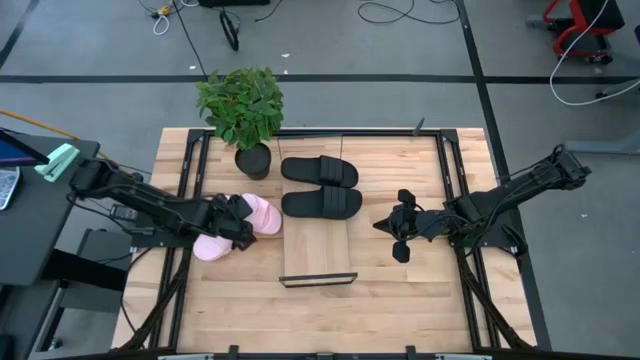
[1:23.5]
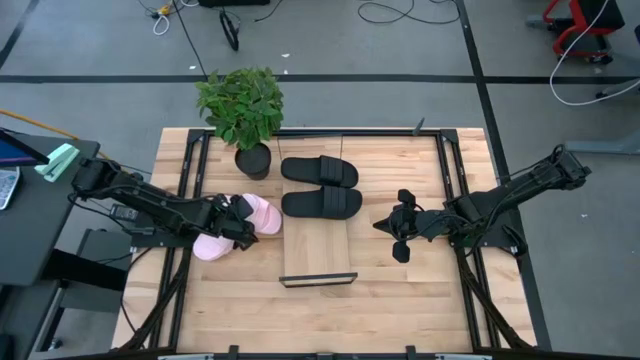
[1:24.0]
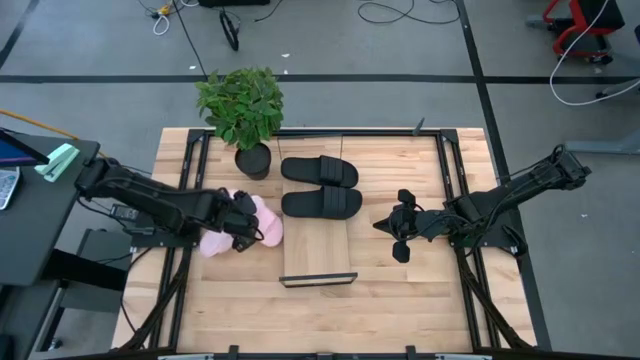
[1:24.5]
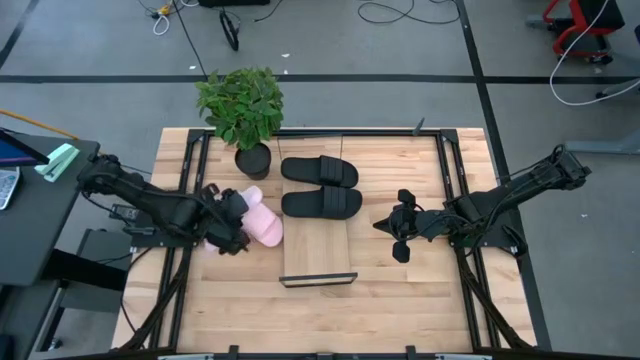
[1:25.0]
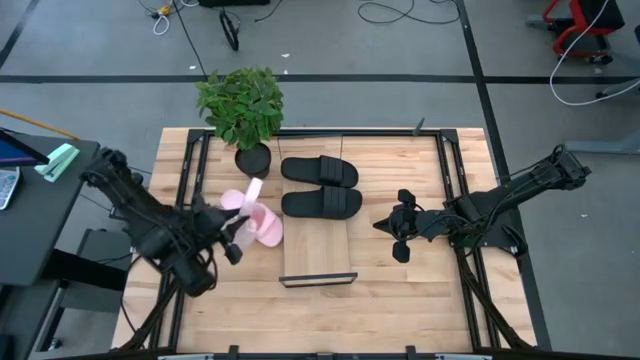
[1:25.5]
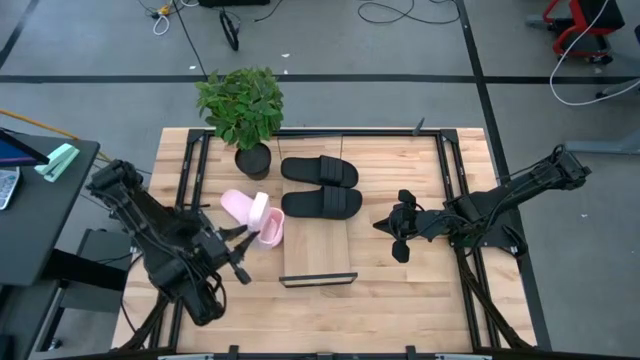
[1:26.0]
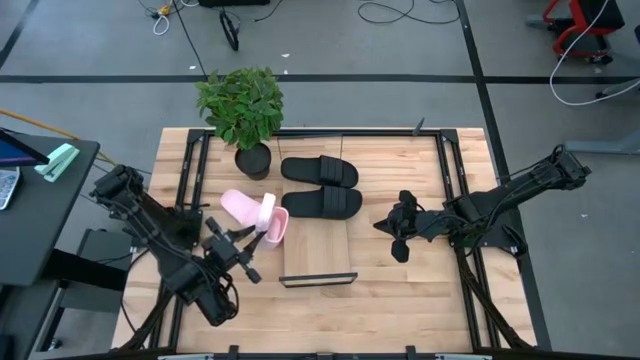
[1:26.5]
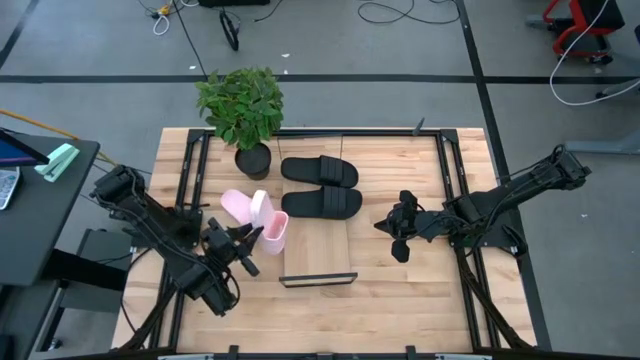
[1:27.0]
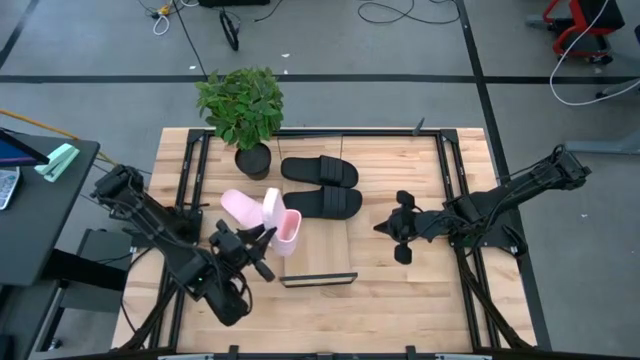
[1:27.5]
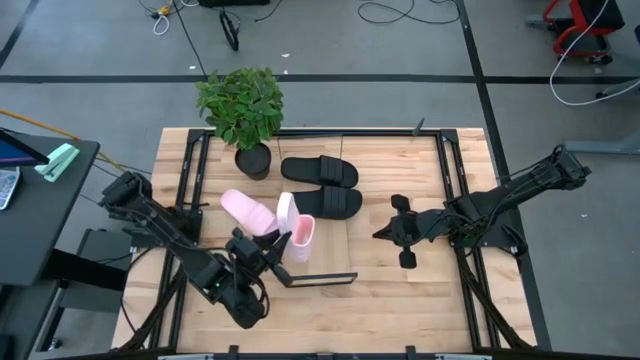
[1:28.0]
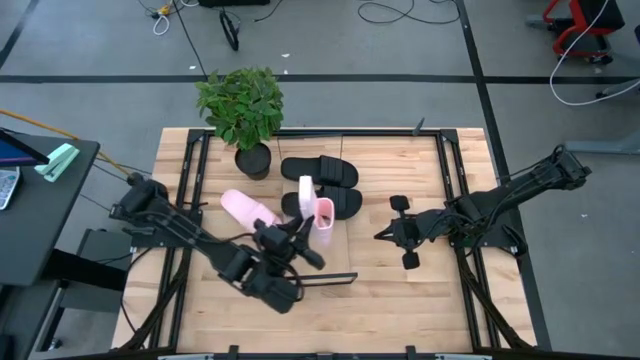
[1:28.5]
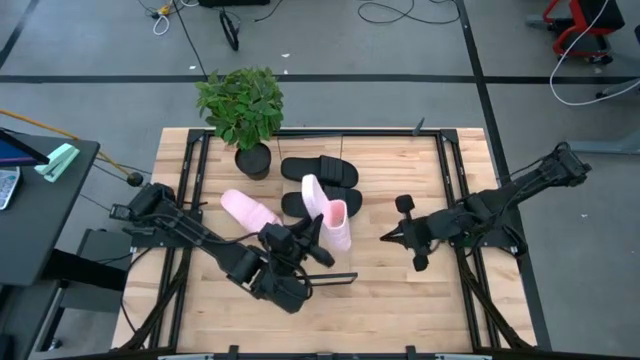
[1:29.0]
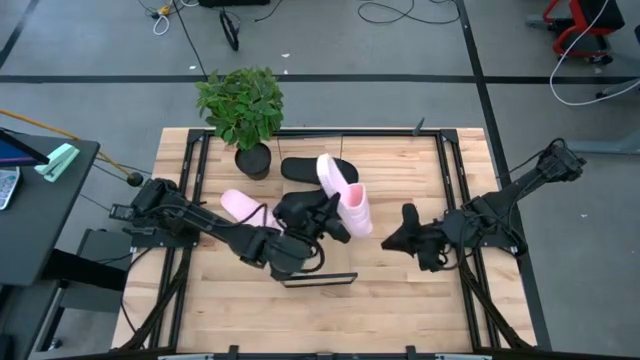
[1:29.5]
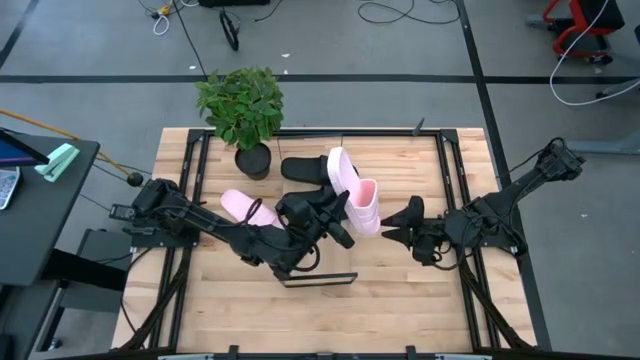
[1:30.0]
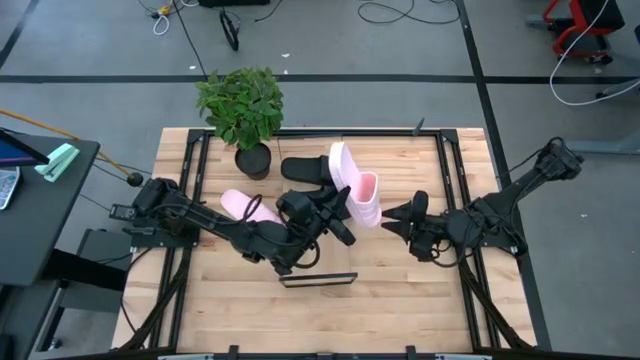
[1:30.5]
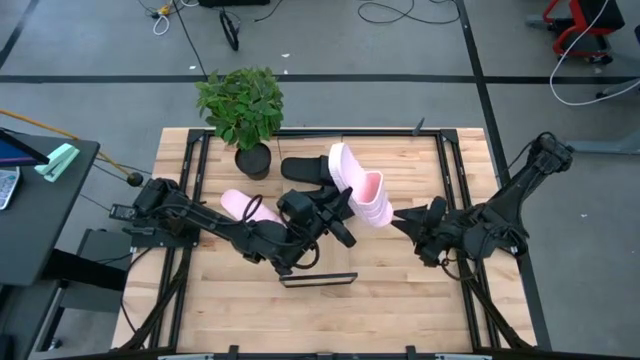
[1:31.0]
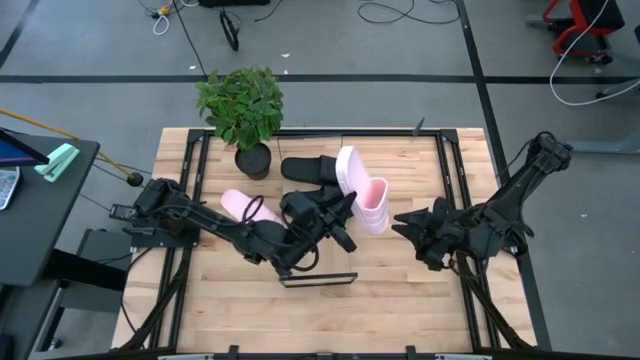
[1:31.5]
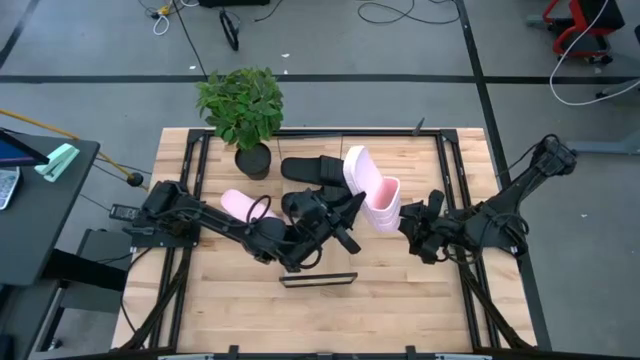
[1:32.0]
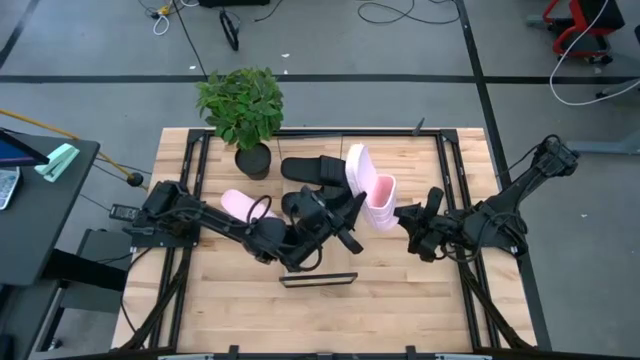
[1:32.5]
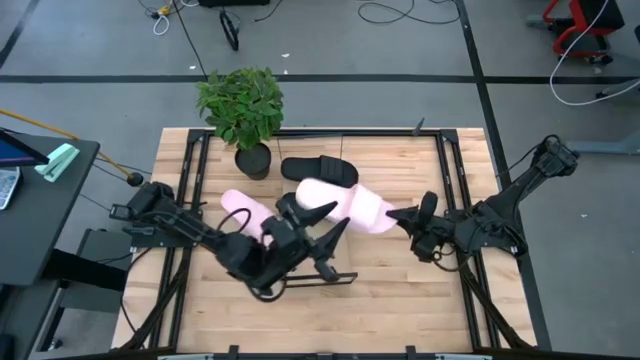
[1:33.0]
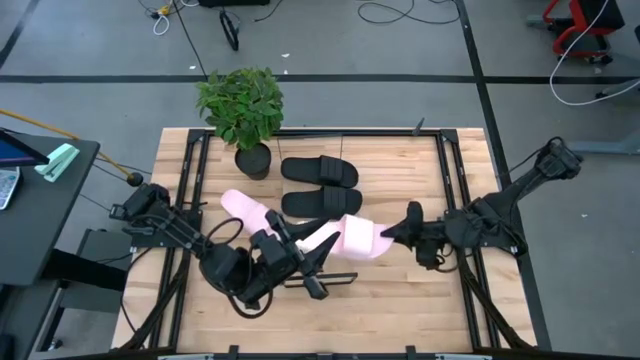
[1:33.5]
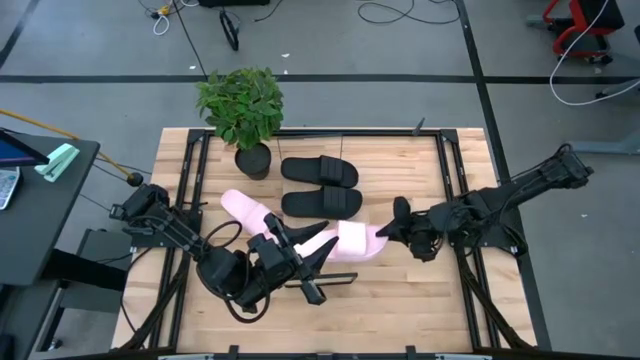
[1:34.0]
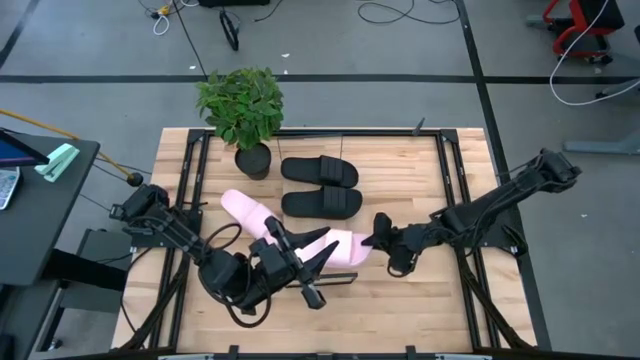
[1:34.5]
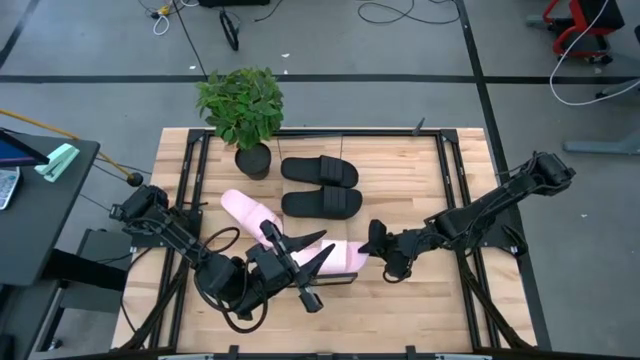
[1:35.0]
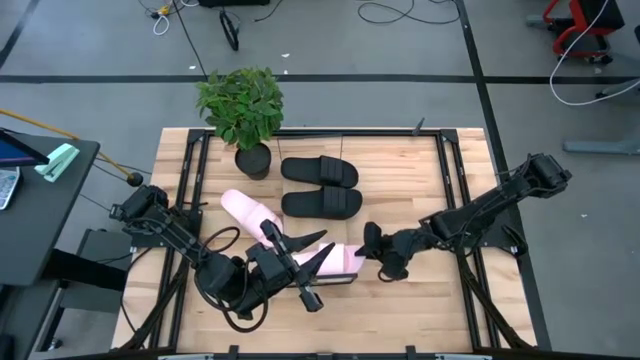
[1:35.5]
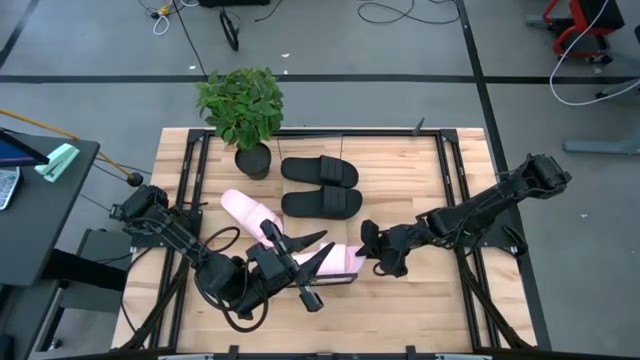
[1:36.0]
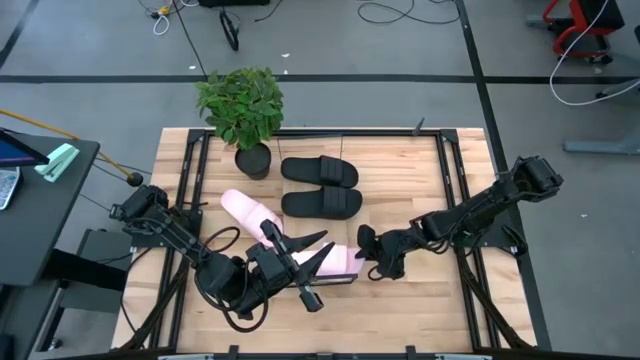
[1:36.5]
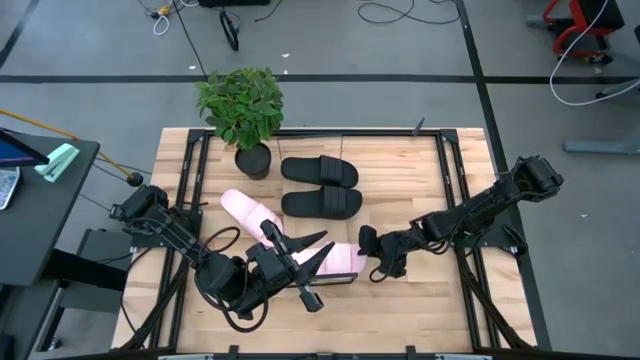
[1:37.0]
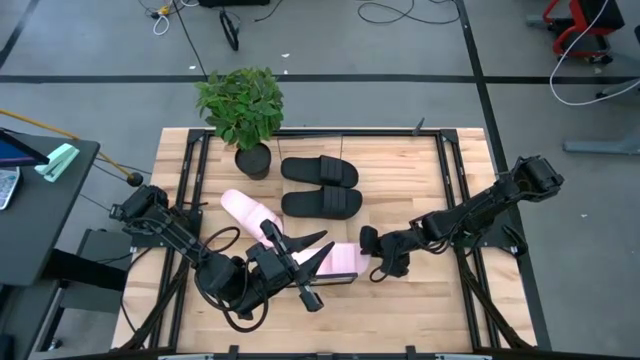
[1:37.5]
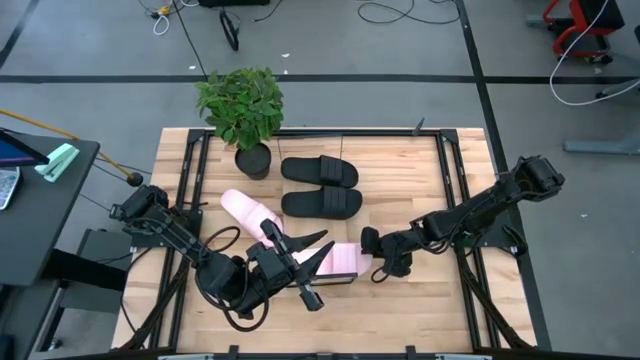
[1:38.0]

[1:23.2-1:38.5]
Task: Pick and place slides into the shelf
Put the bottom pink slipper on the shelf

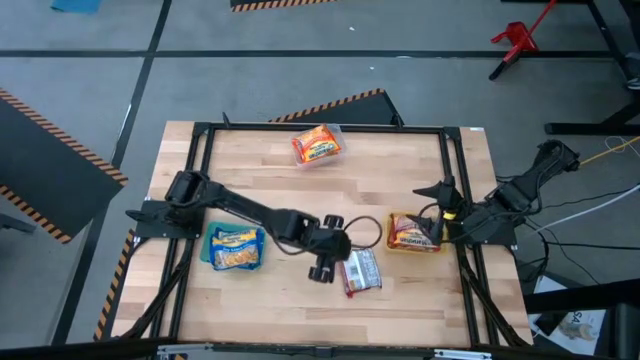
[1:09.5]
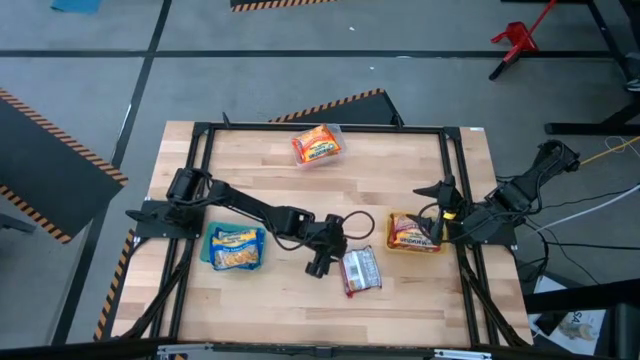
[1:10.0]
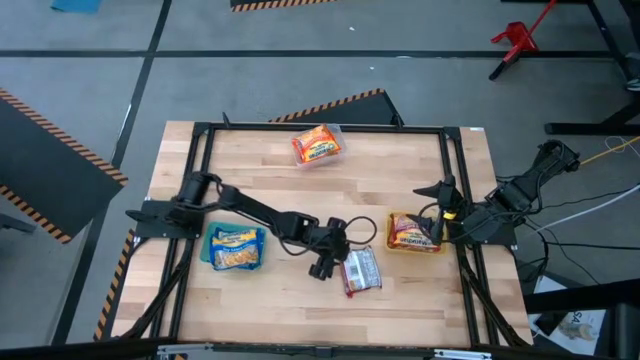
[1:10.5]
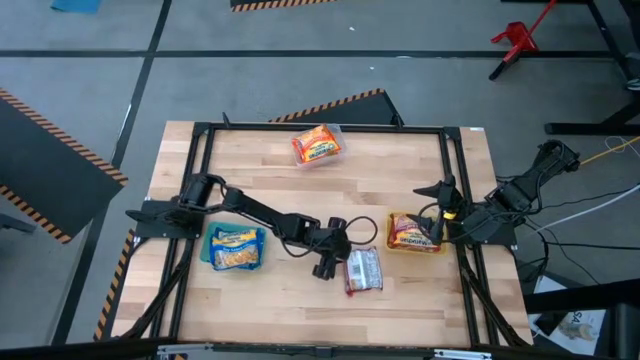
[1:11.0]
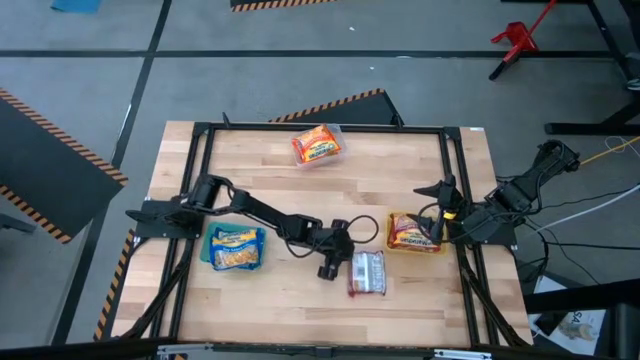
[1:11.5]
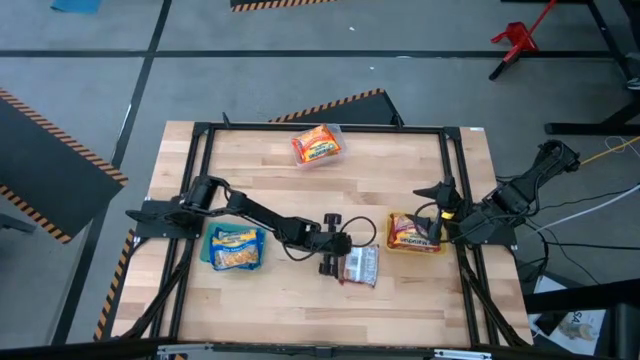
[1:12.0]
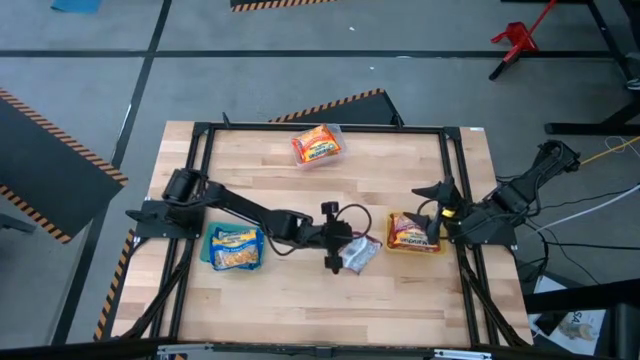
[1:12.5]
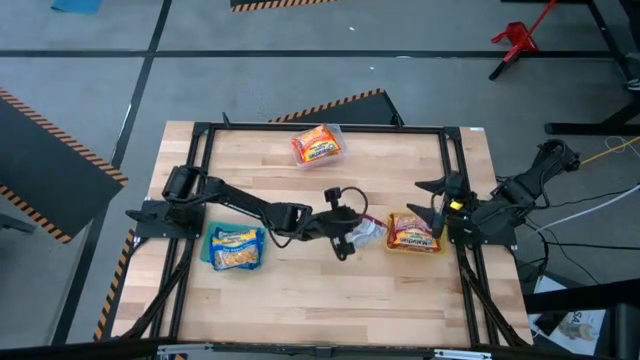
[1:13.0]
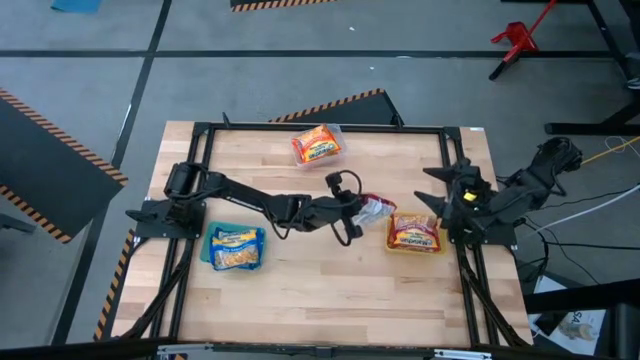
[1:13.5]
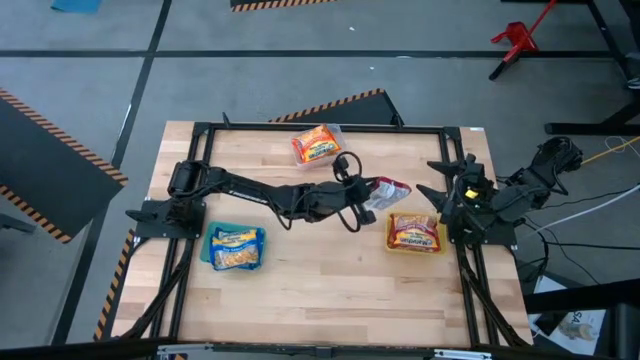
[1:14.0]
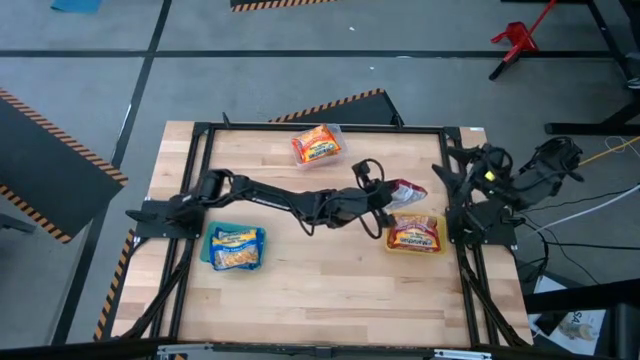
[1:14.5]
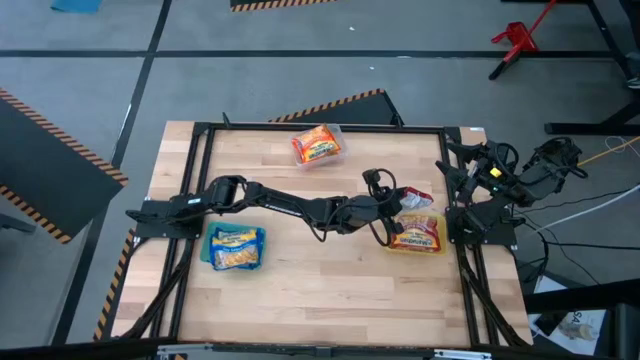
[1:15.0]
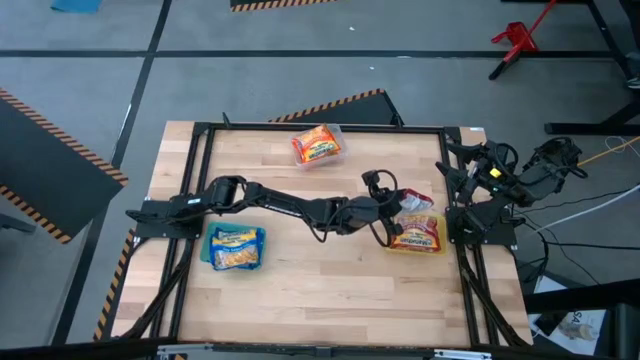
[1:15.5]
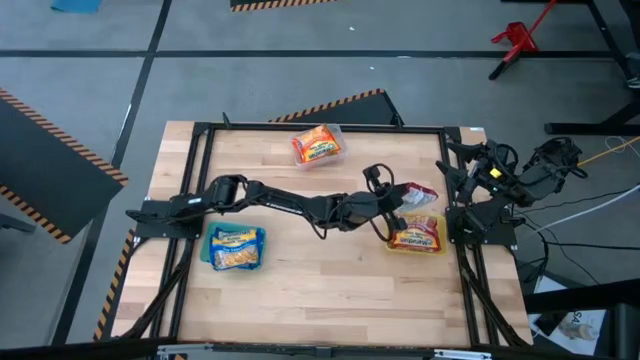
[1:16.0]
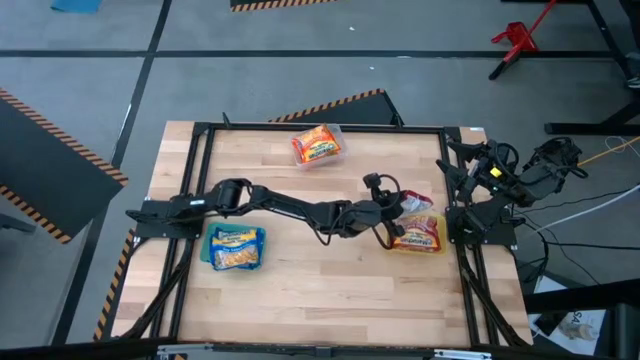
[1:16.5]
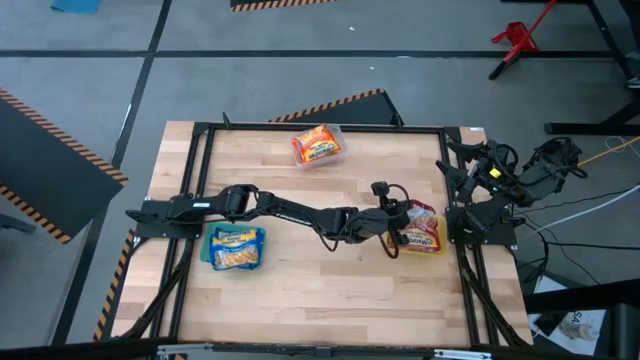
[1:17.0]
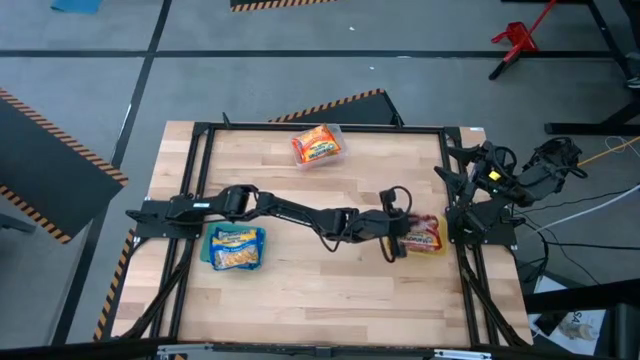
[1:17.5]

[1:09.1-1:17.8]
Task: Sort Maruchan noodles
Put the red noodle pack into the yellow bin
